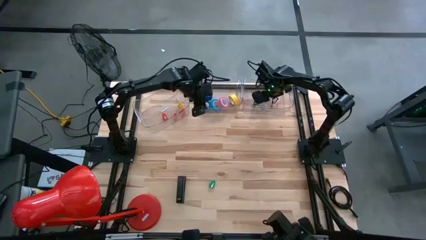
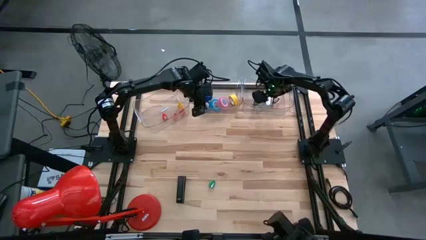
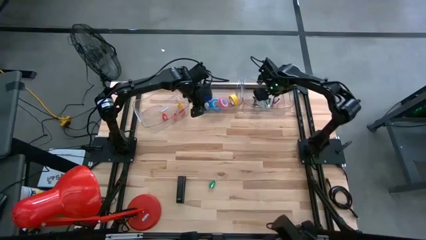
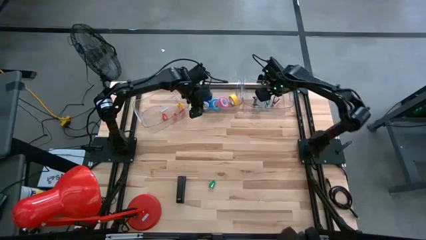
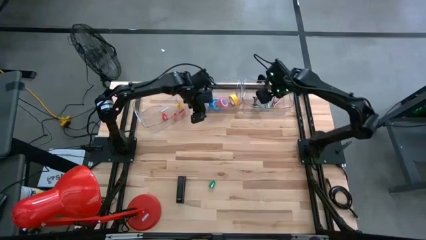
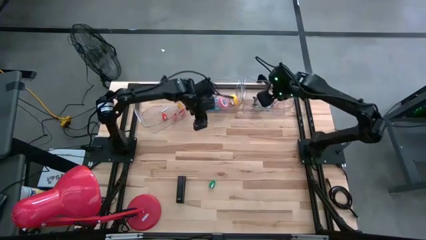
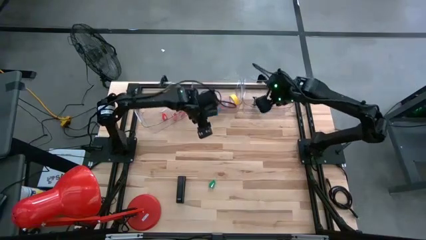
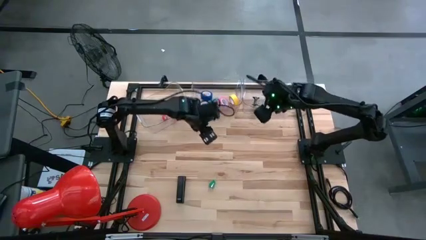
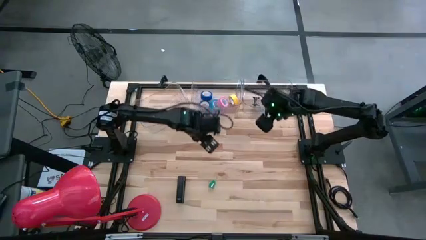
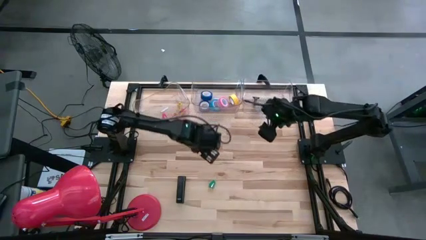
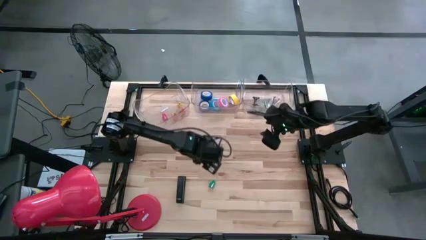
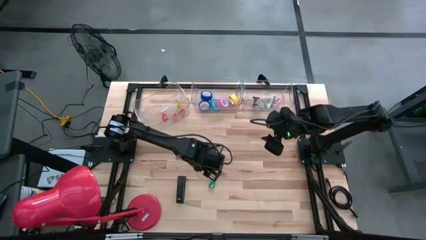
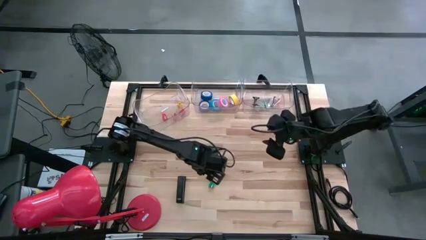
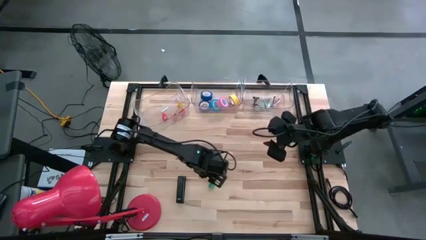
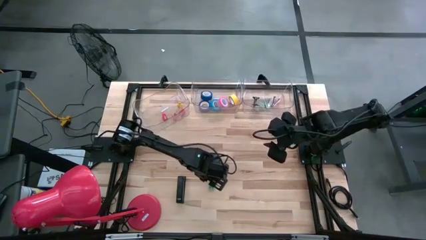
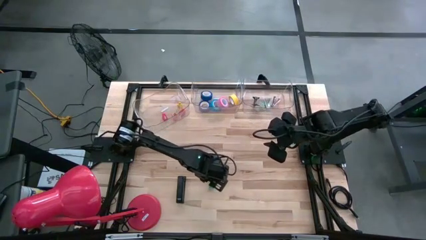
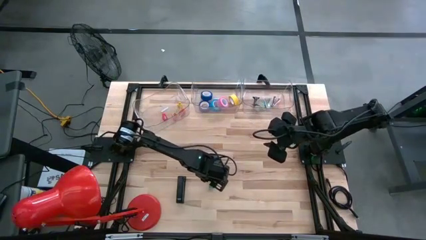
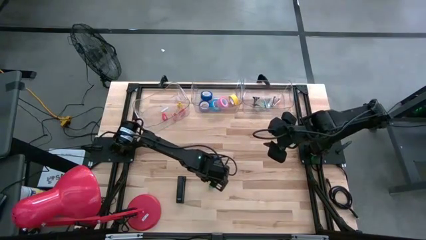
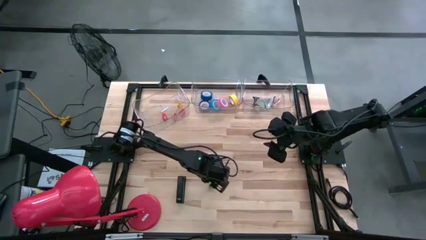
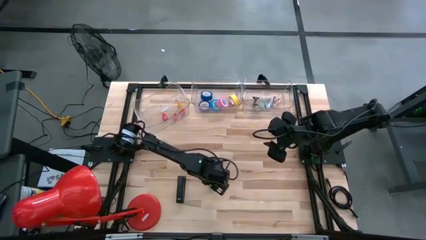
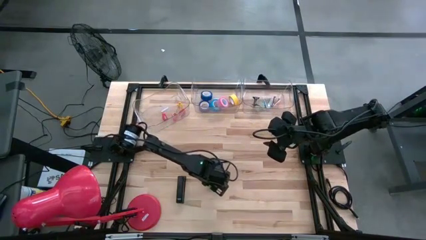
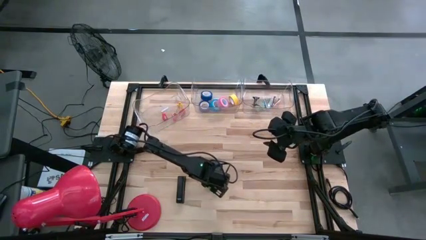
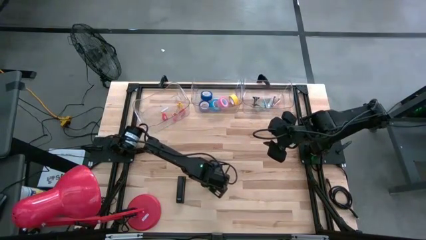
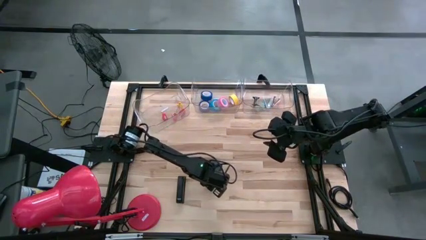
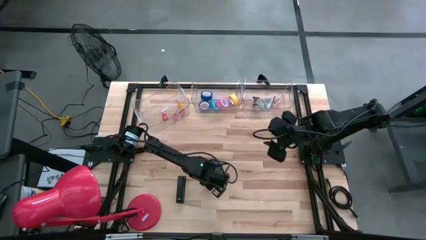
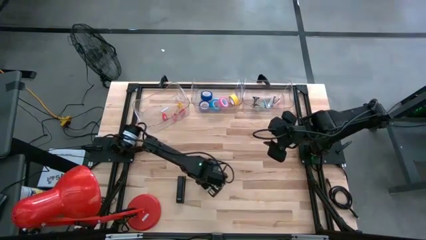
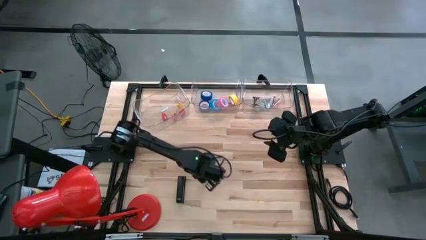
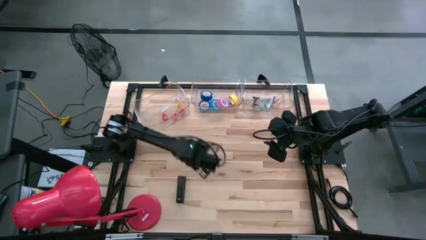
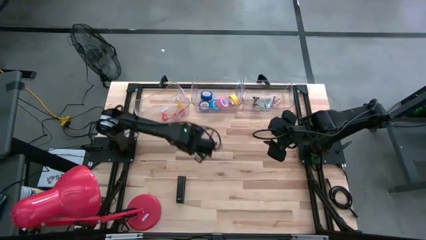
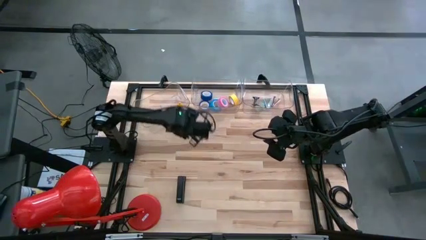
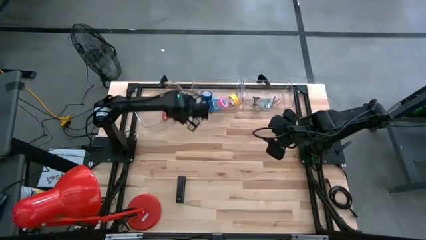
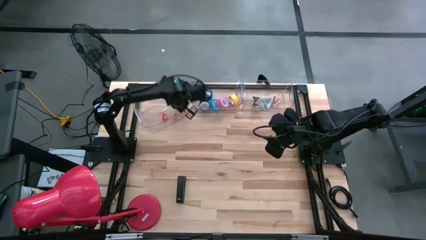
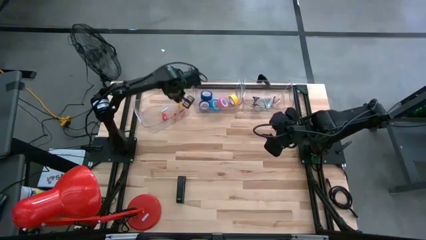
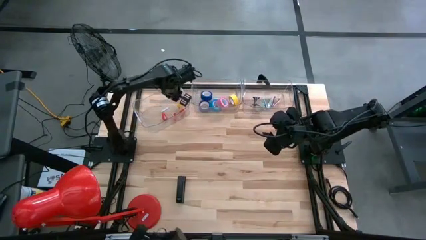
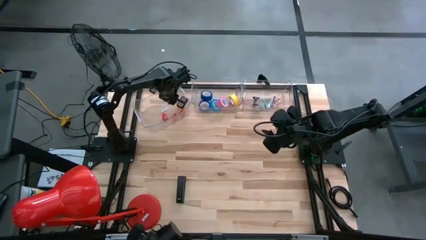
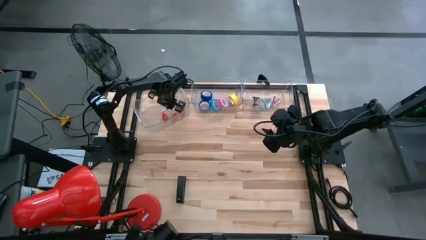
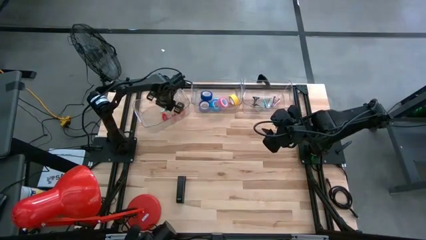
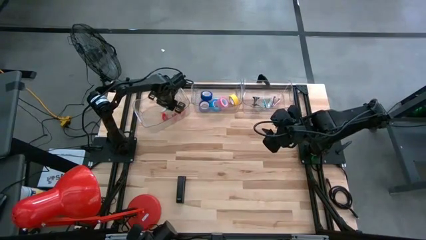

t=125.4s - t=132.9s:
Task: Pick and place Stapler, Stapler remover, tape
Put the green stapler into the left transparent bin

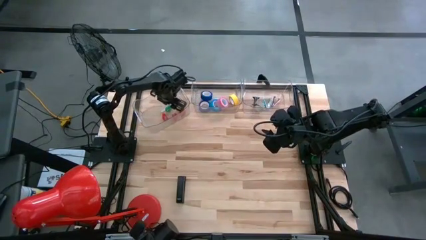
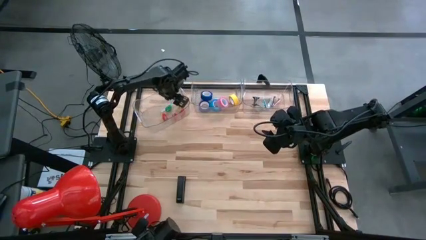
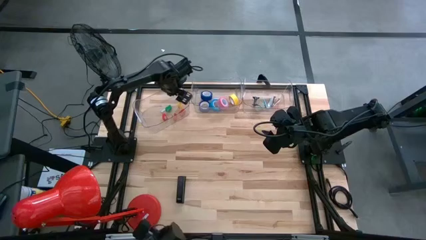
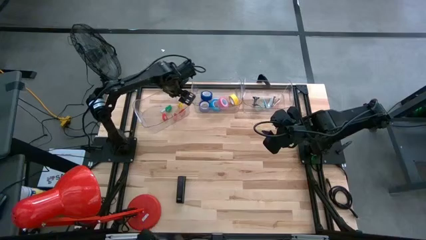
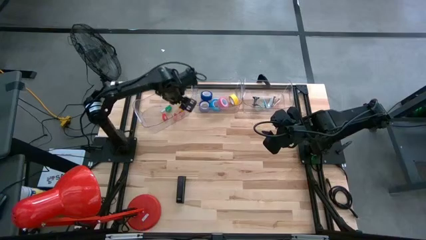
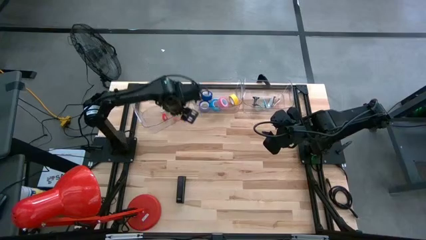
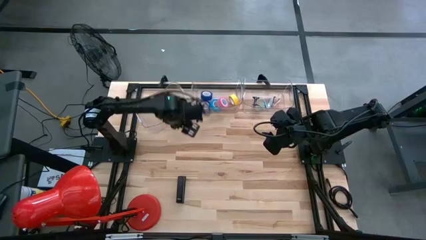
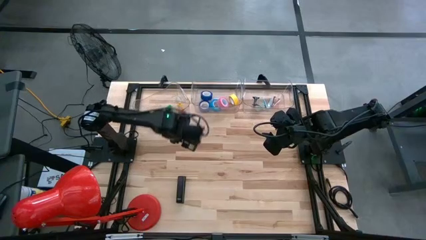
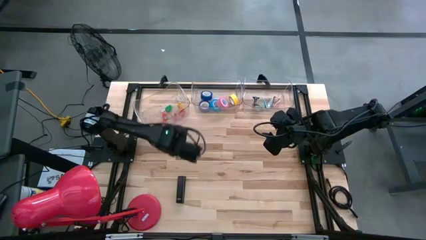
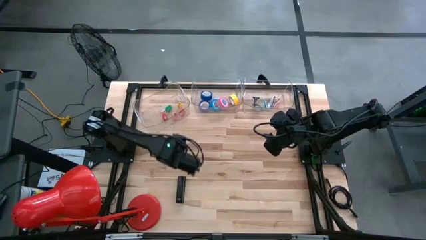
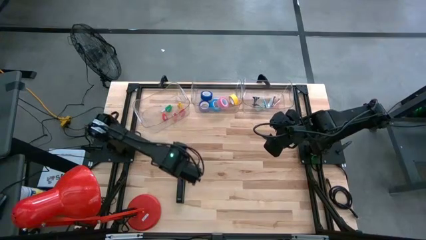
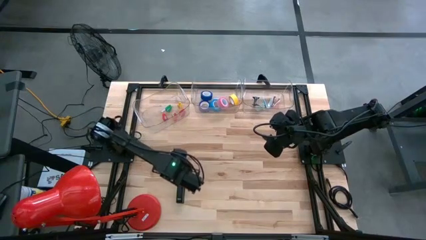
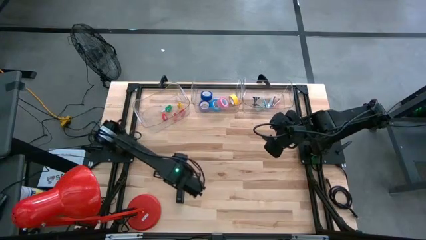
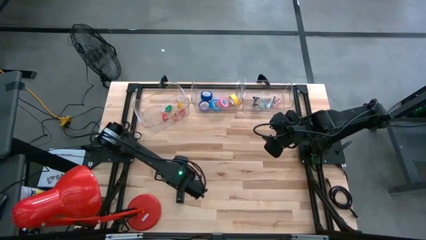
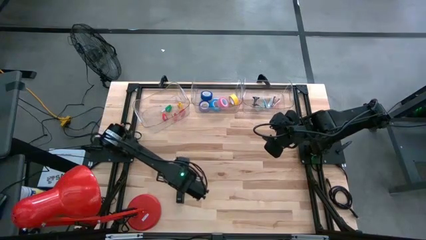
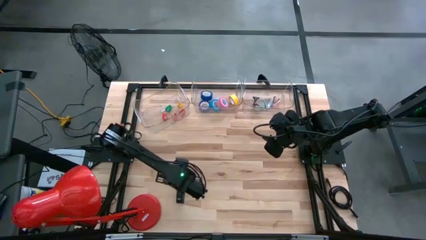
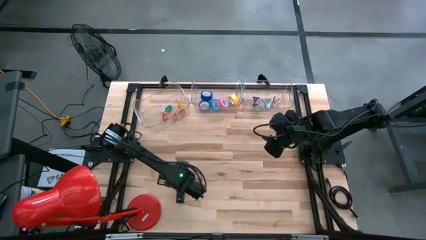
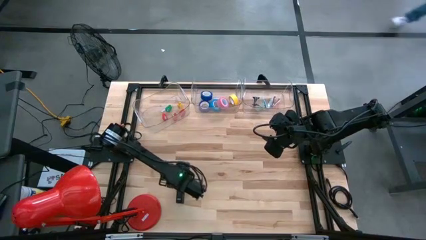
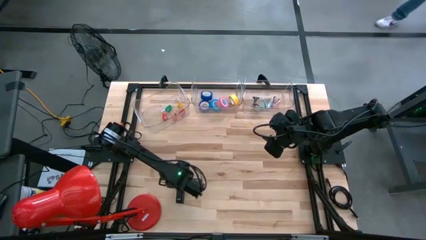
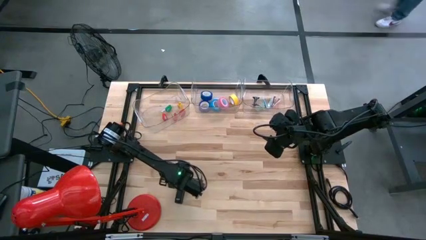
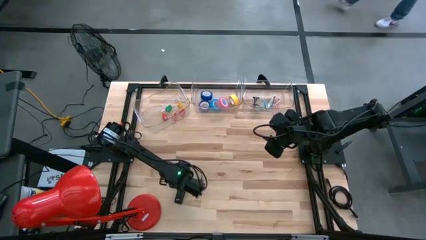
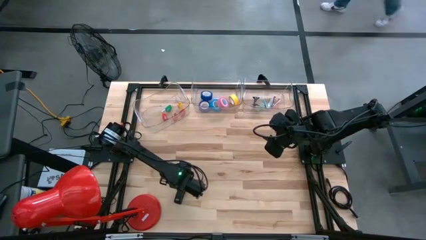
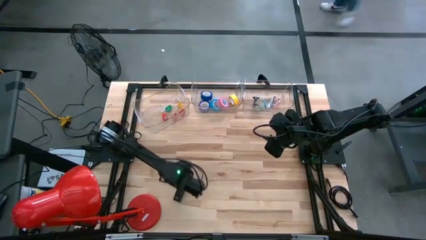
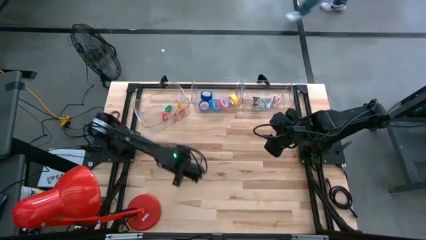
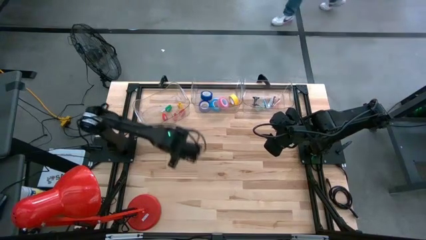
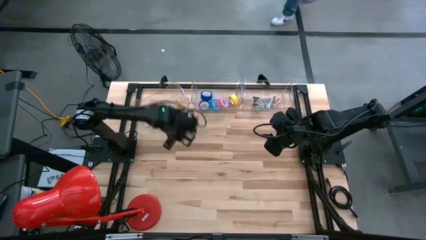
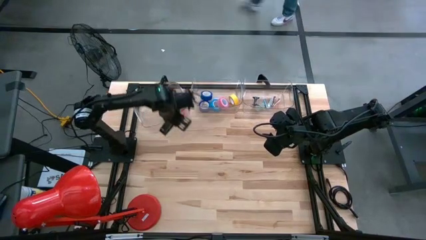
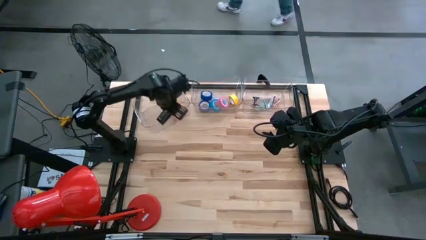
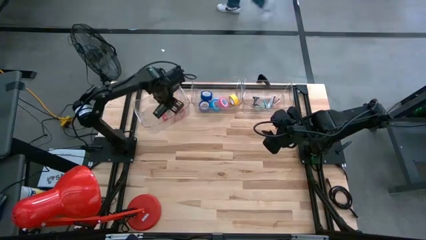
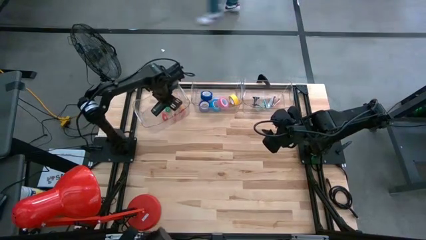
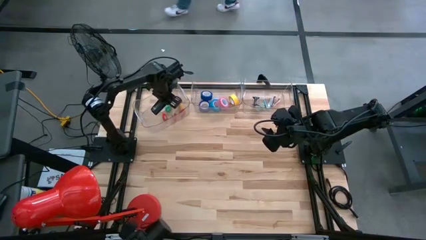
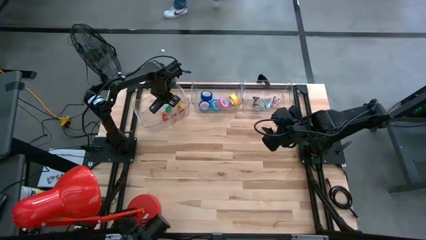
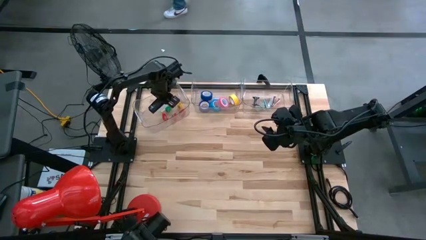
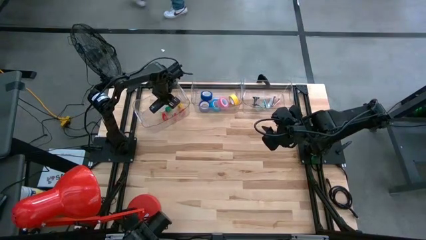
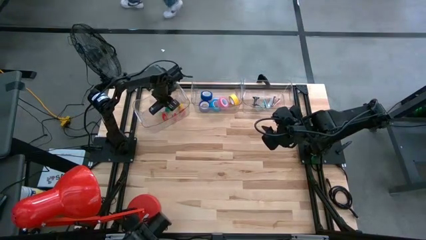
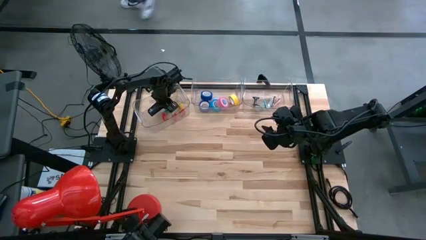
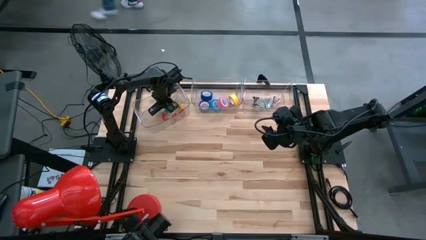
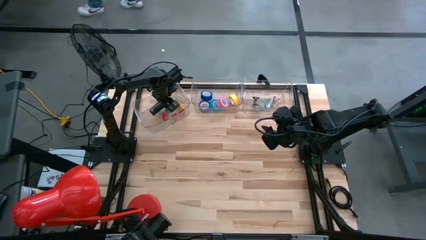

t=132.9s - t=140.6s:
Put the black stapler into the left transparent bin
